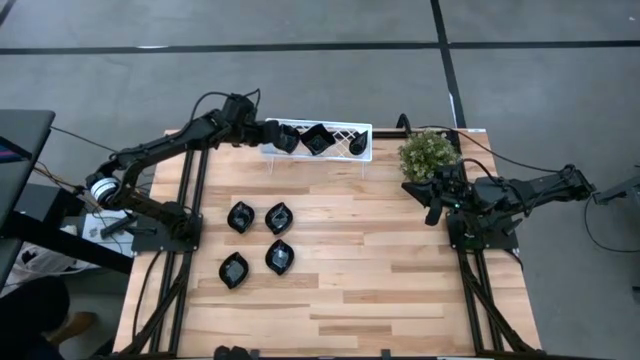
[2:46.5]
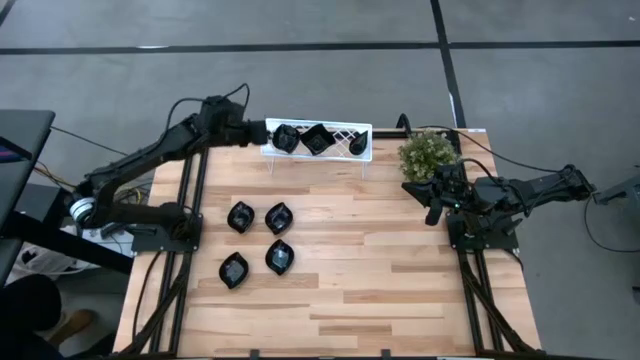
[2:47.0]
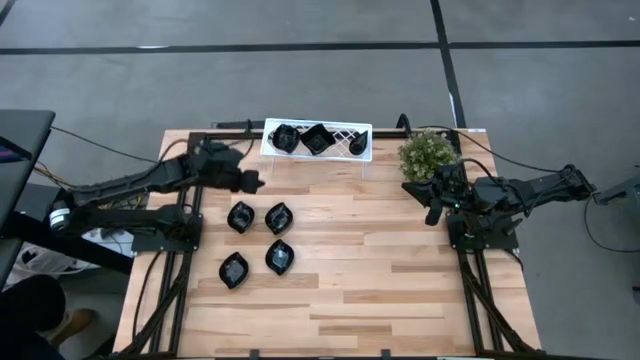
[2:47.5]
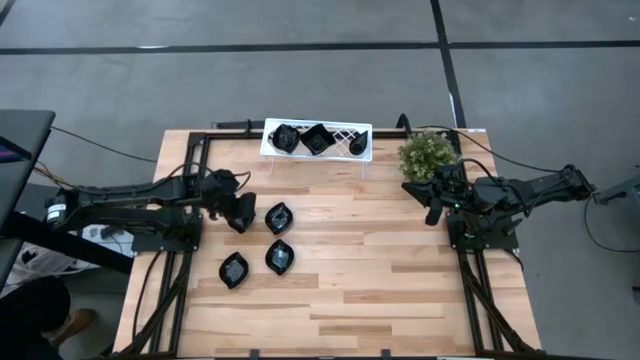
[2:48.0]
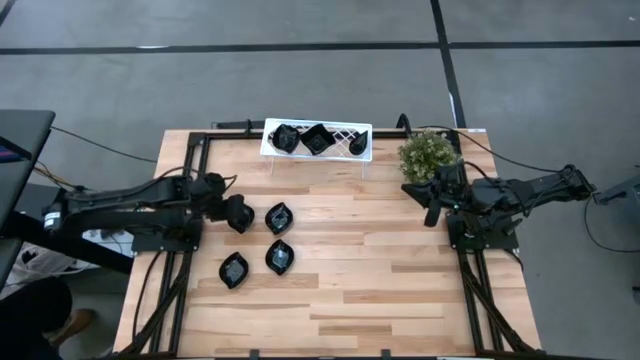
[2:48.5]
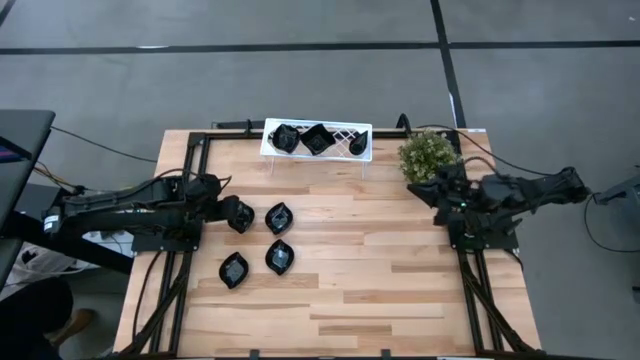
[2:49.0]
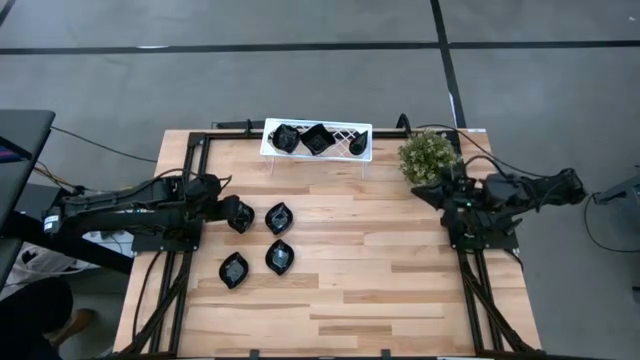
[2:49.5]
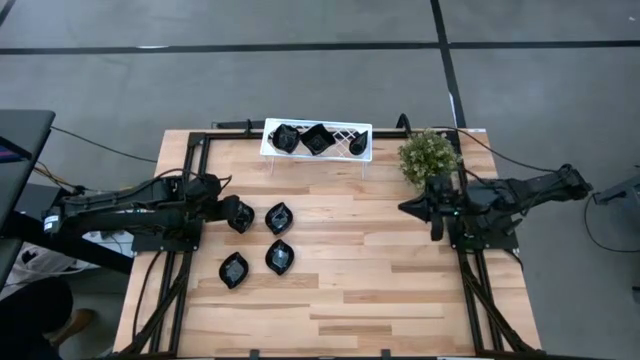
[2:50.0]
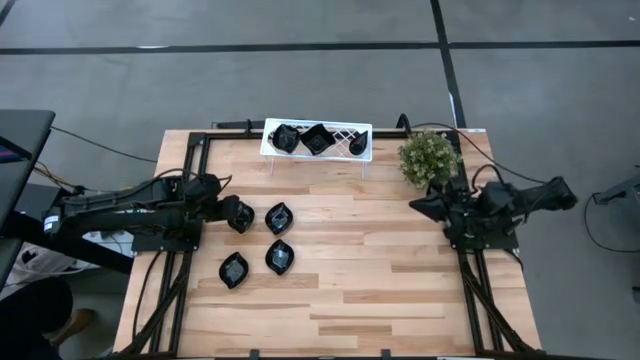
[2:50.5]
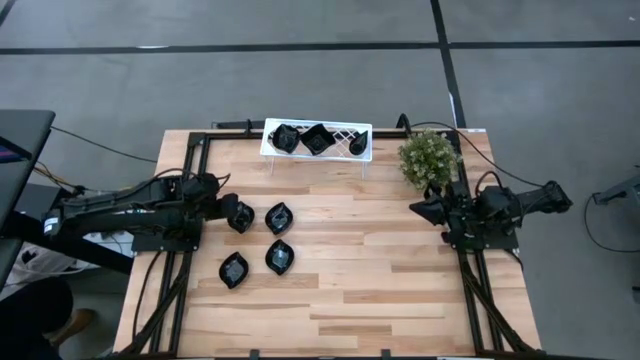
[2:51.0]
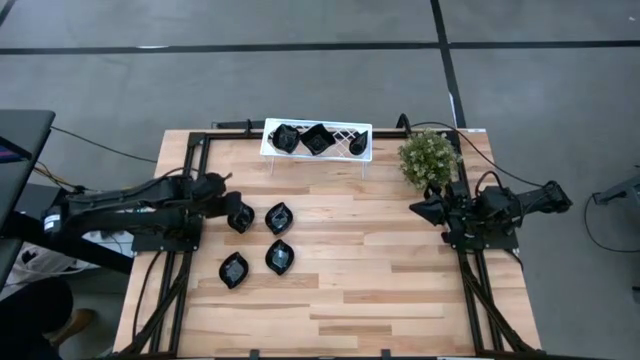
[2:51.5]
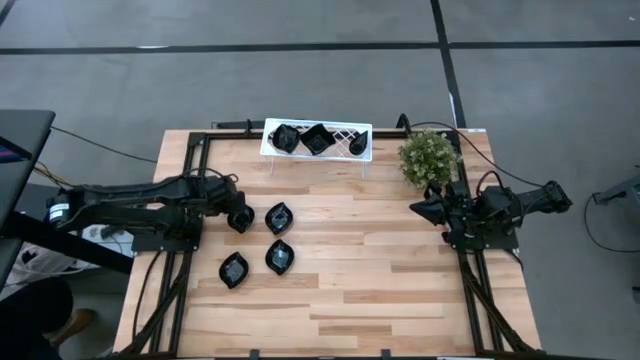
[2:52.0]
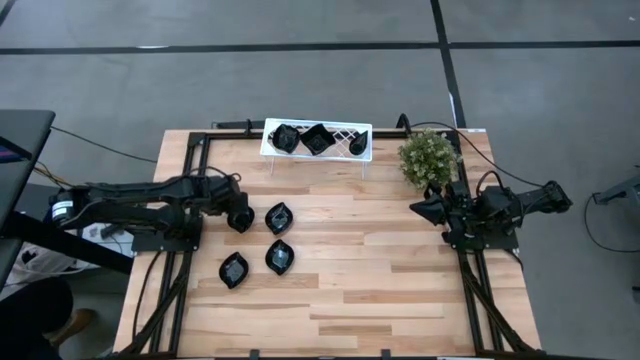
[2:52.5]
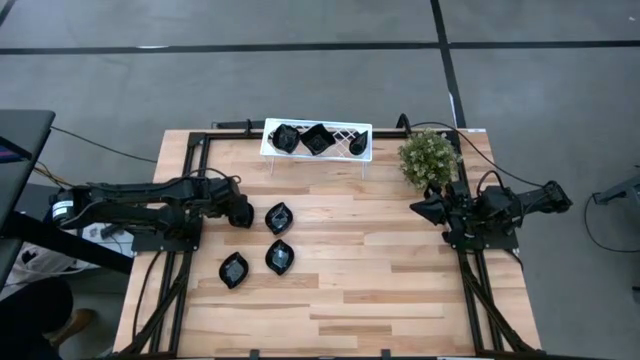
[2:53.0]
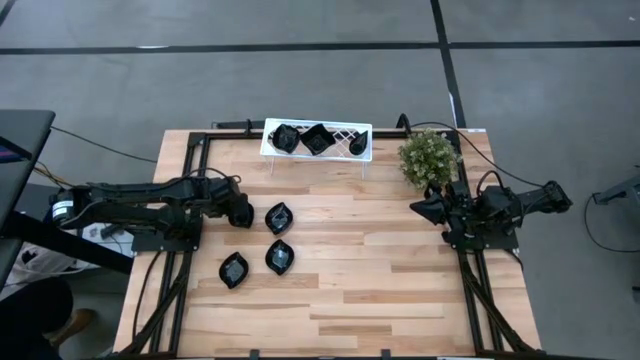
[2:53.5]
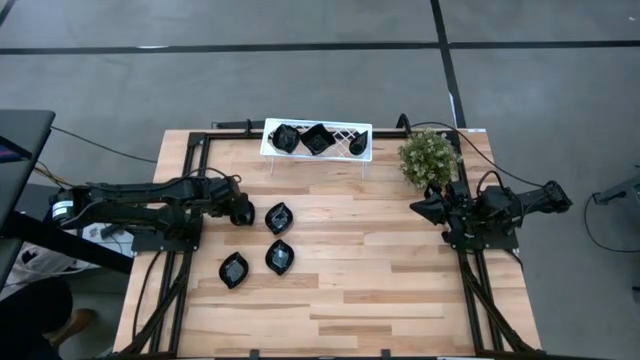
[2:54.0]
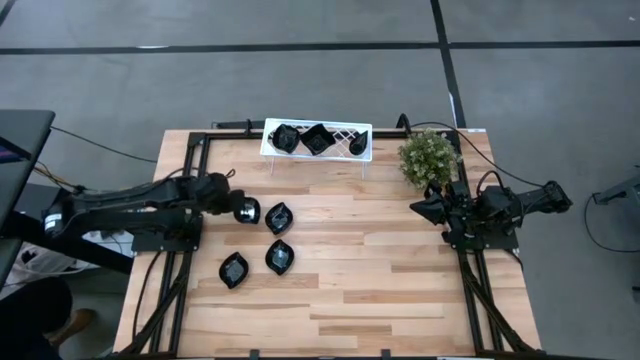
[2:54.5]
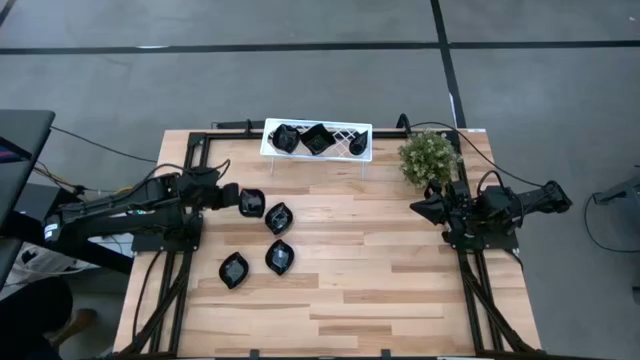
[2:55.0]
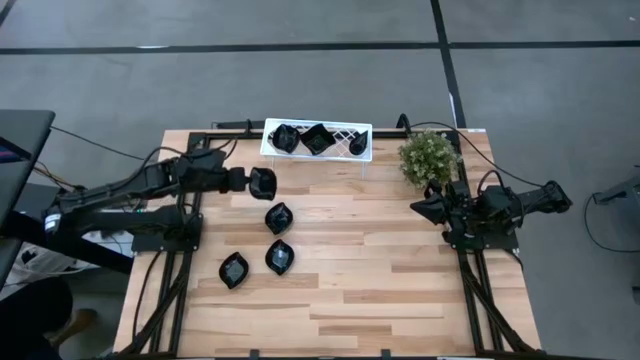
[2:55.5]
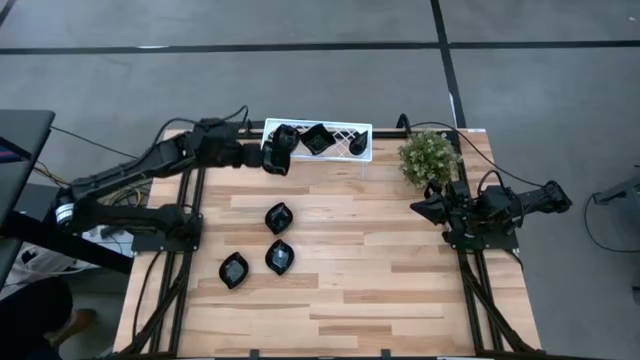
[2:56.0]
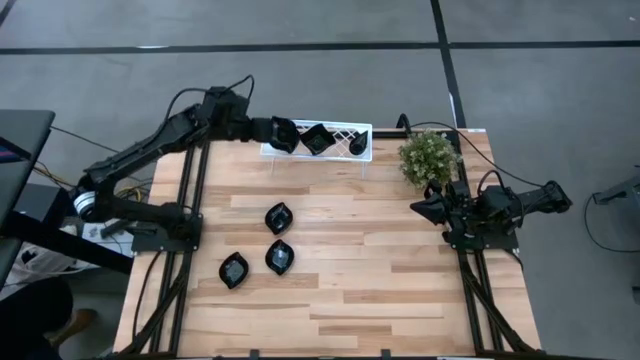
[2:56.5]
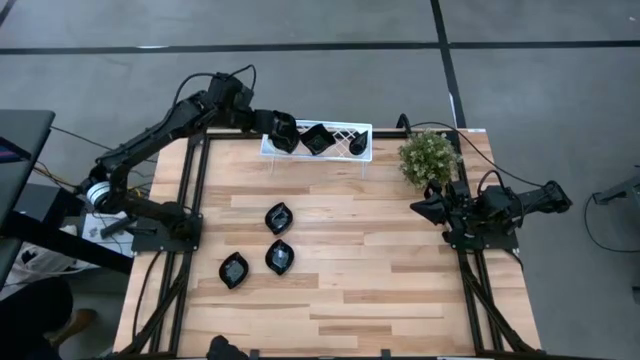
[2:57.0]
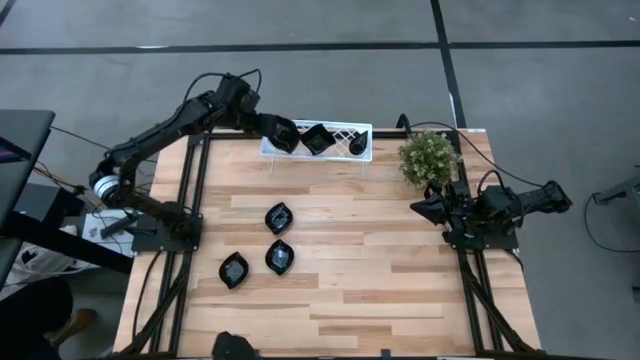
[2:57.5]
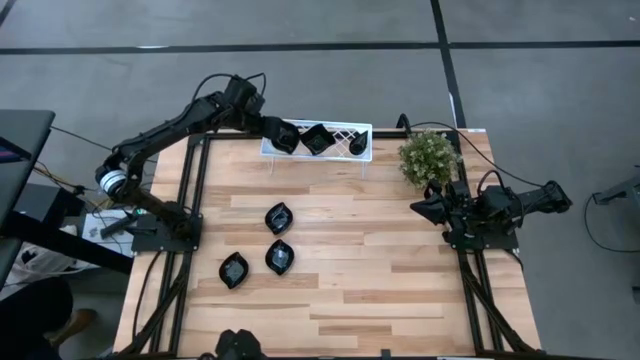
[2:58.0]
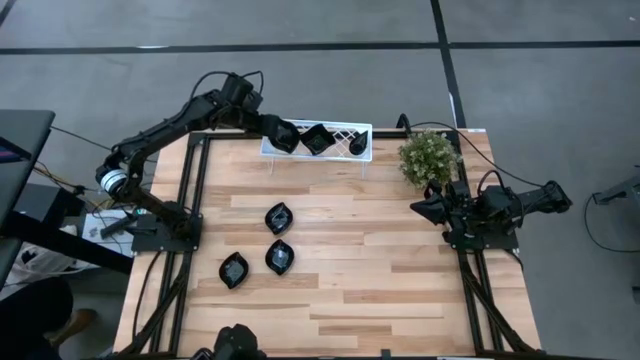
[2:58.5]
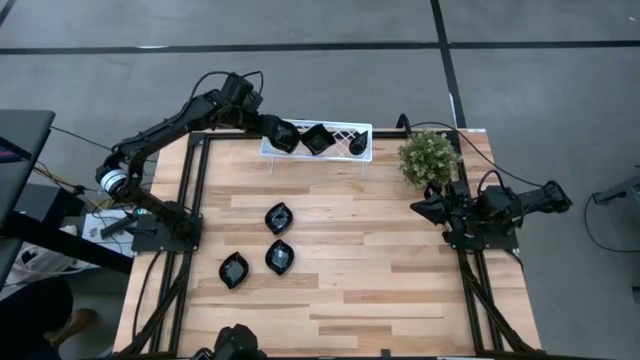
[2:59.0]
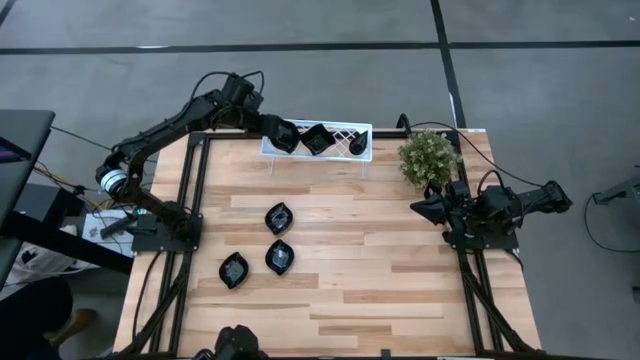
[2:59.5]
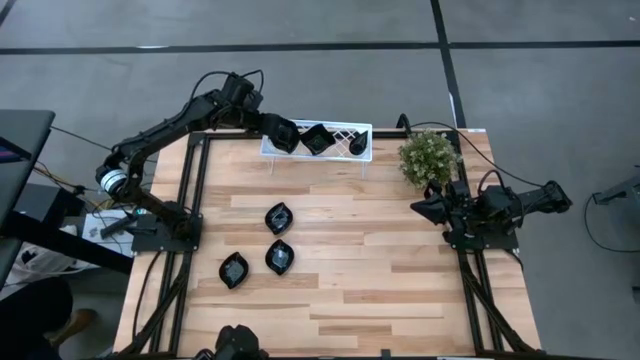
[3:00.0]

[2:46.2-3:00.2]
Task: Pick & Place Mini shaped plates
Stack the black leaf shaped plate on top of the black leaf shaped plate on the shelf

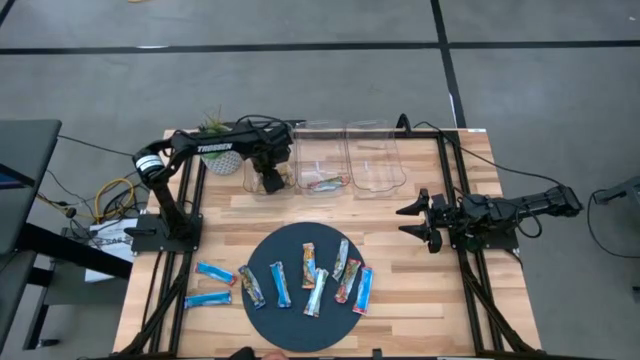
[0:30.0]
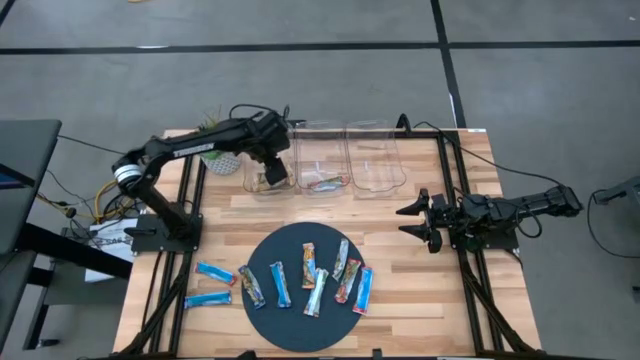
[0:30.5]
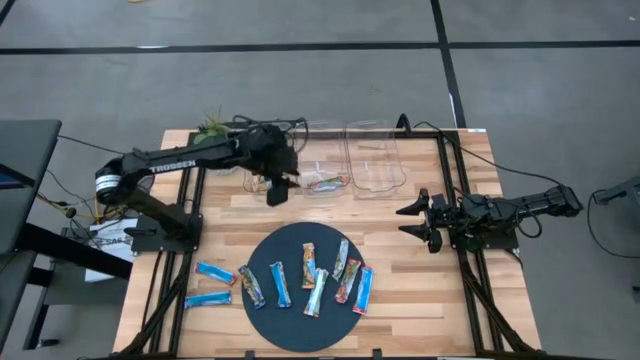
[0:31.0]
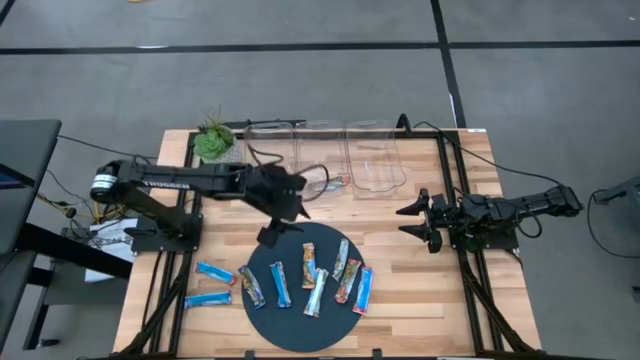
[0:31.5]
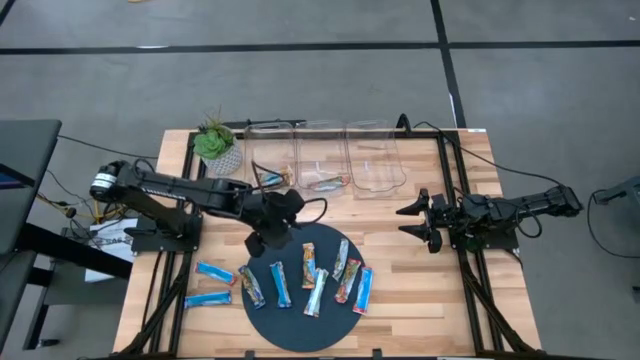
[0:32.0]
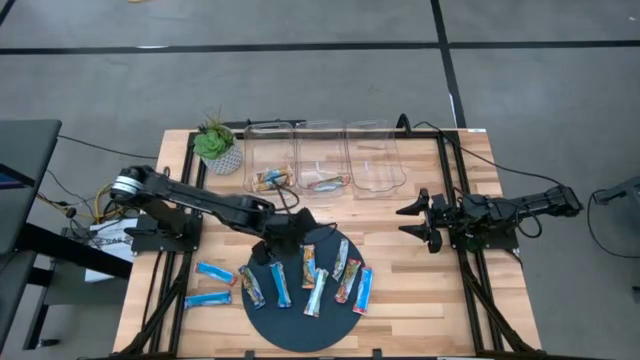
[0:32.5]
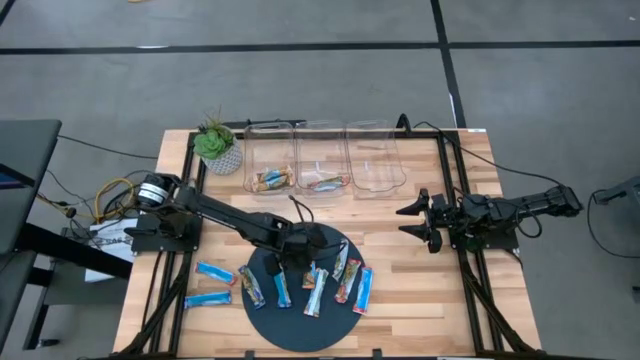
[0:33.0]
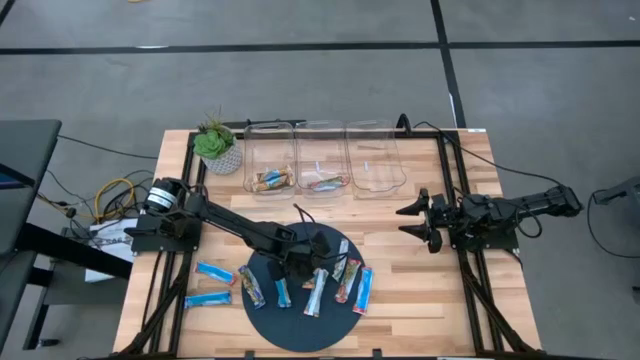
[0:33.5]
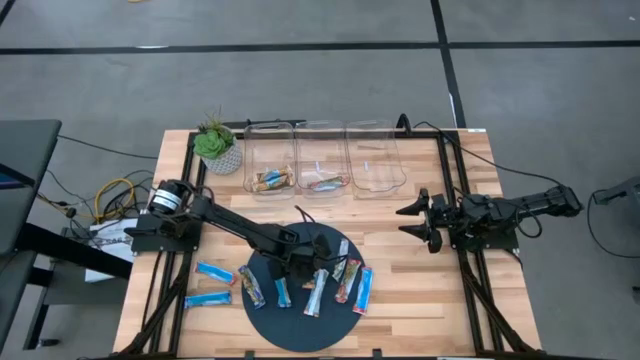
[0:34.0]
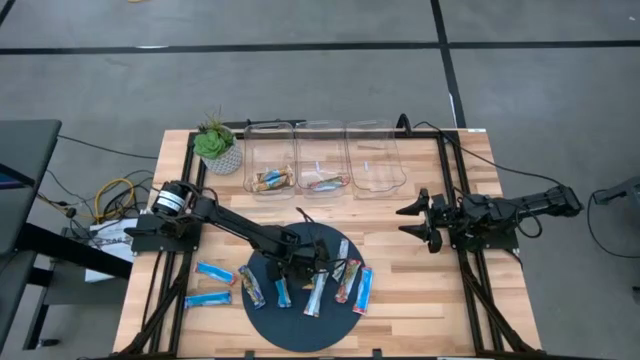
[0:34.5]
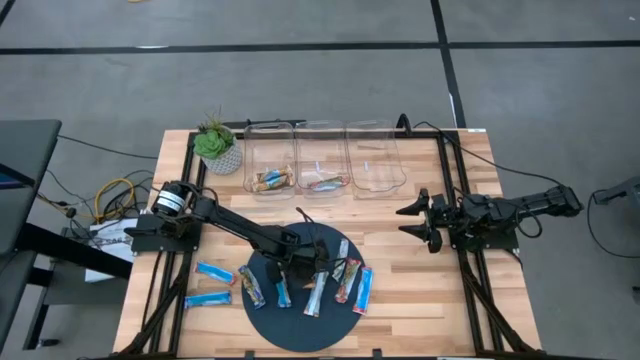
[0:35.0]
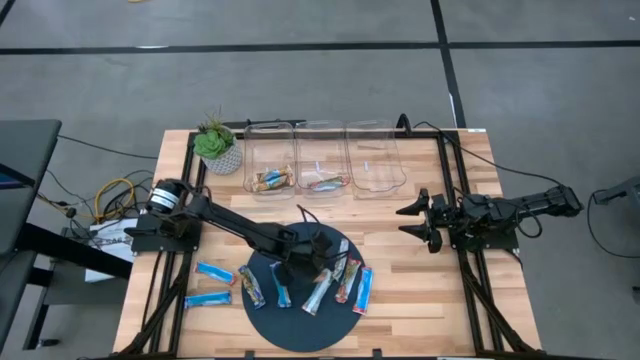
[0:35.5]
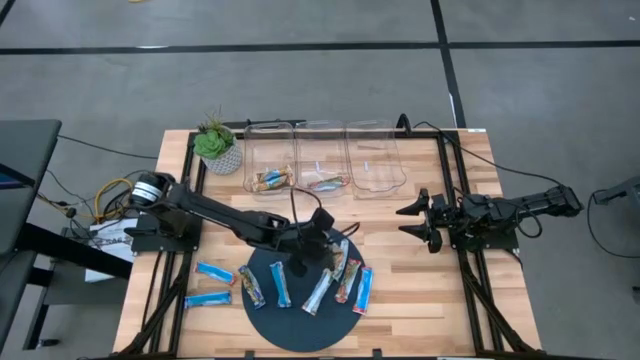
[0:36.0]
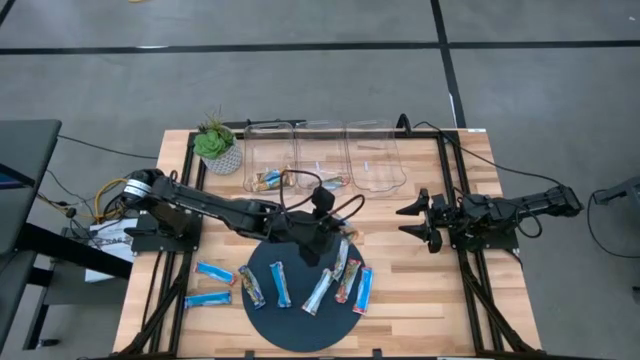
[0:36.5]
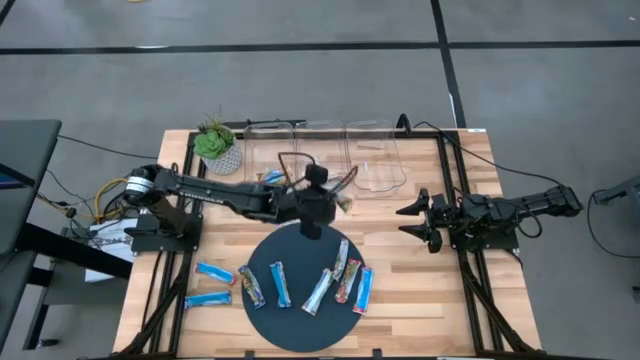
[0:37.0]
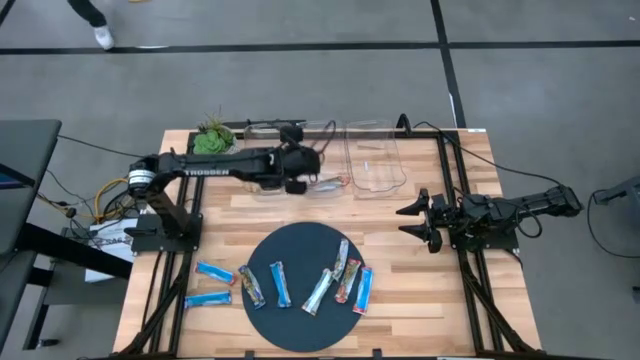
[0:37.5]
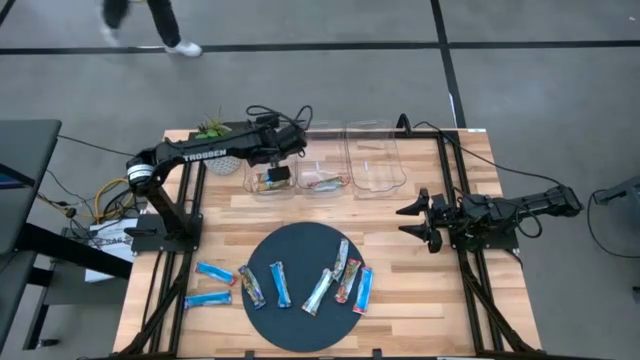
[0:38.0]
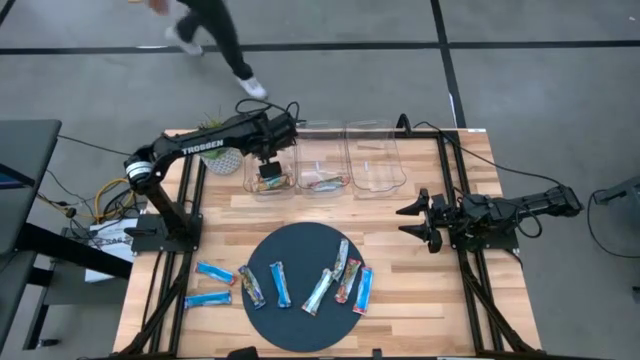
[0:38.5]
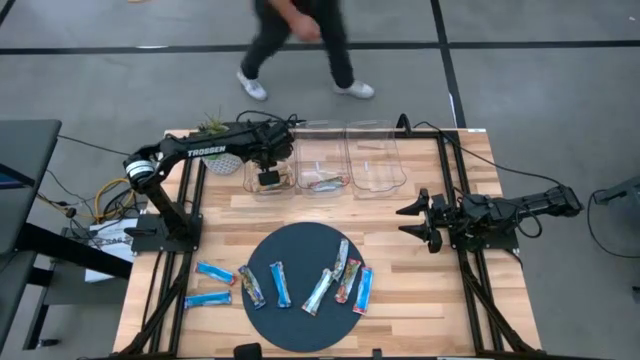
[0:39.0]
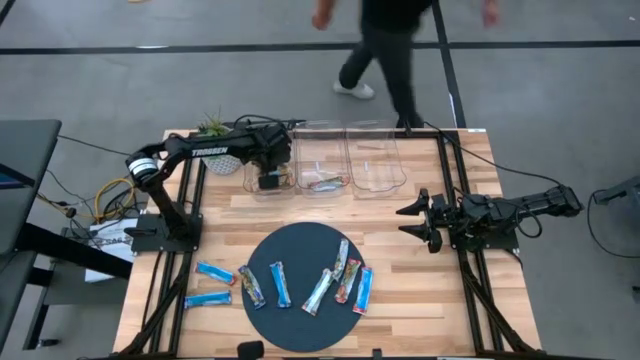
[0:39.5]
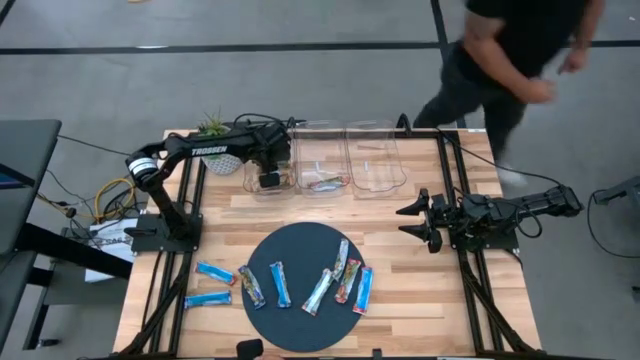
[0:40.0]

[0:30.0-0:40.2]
Task: Pick and place Granola Bars by type
Put the orange bar into the left transparent bin
